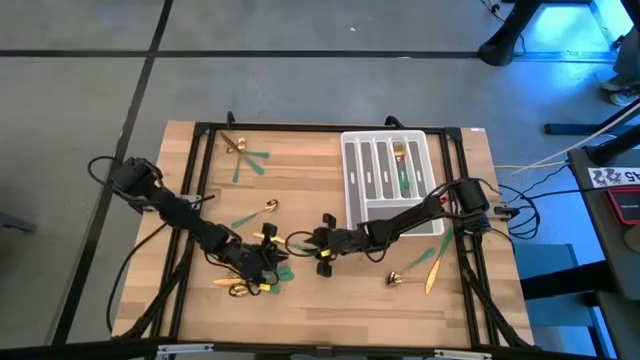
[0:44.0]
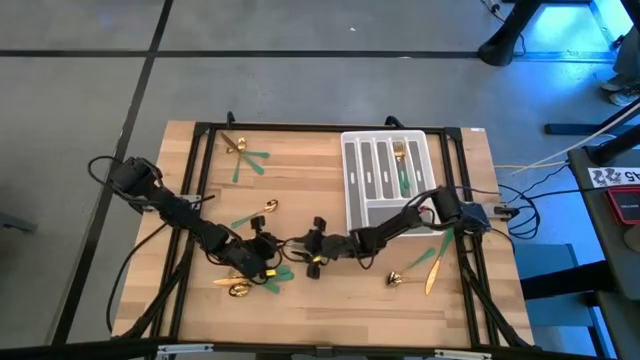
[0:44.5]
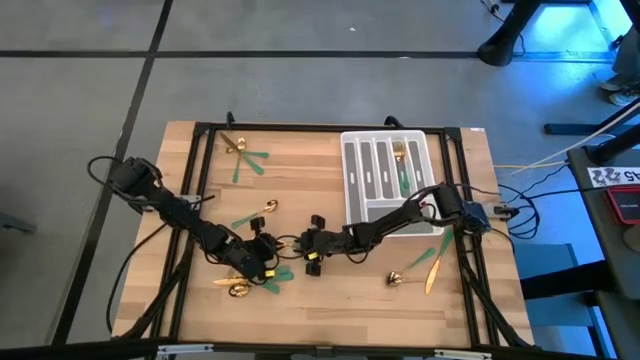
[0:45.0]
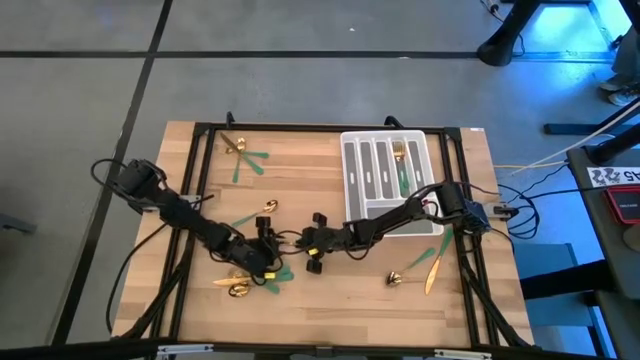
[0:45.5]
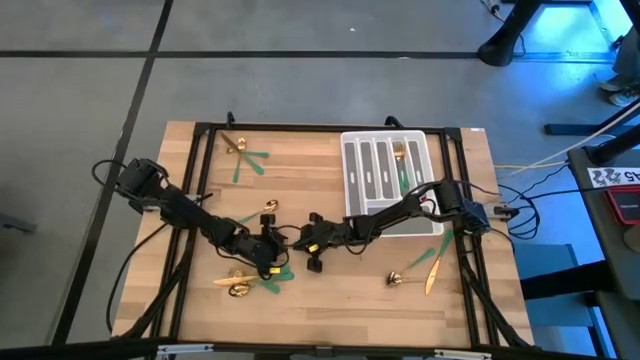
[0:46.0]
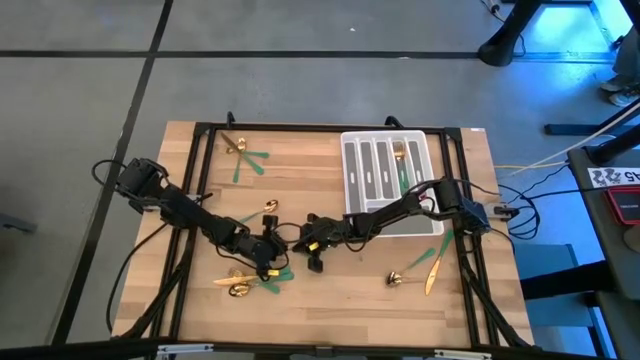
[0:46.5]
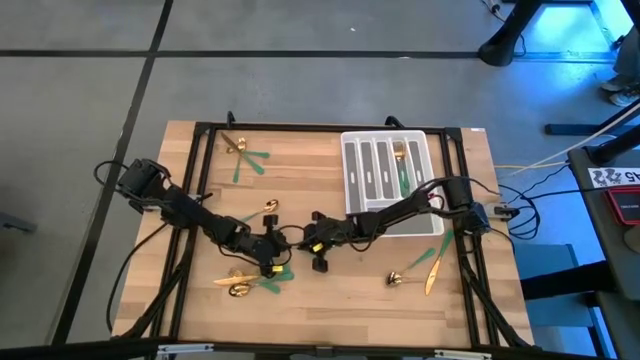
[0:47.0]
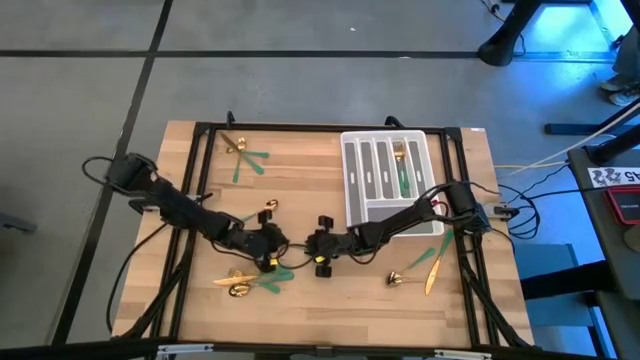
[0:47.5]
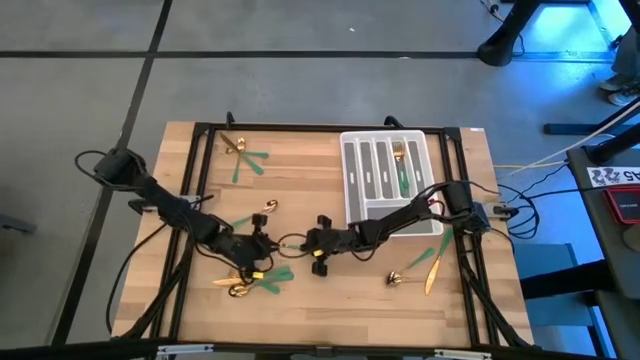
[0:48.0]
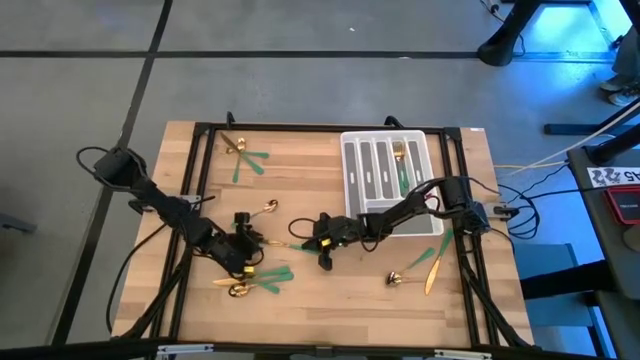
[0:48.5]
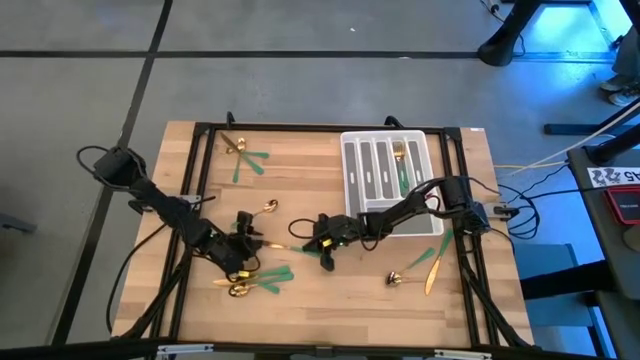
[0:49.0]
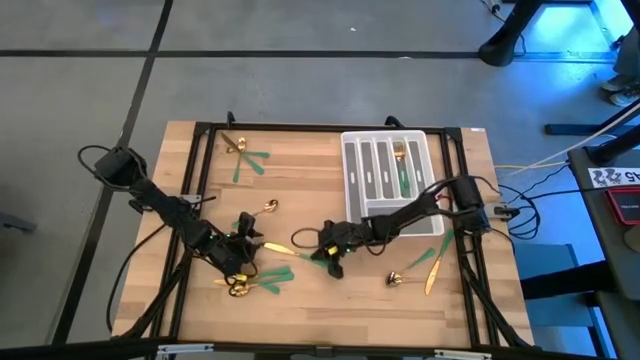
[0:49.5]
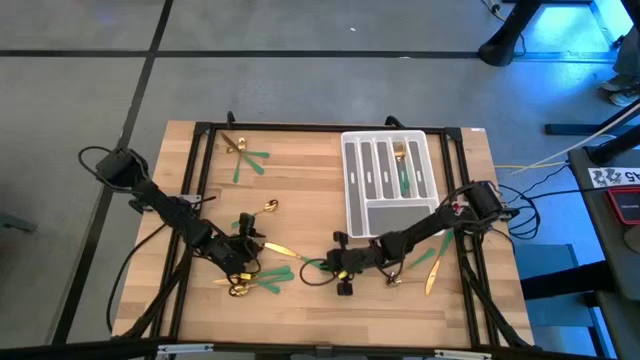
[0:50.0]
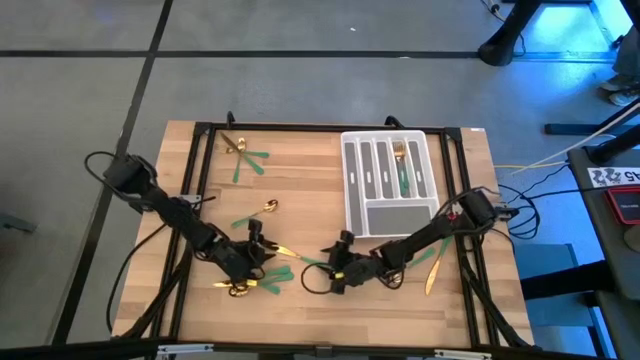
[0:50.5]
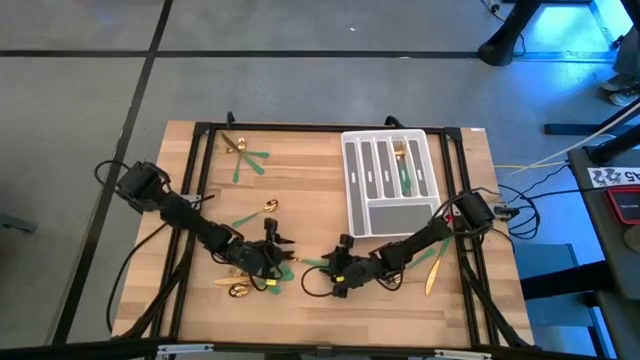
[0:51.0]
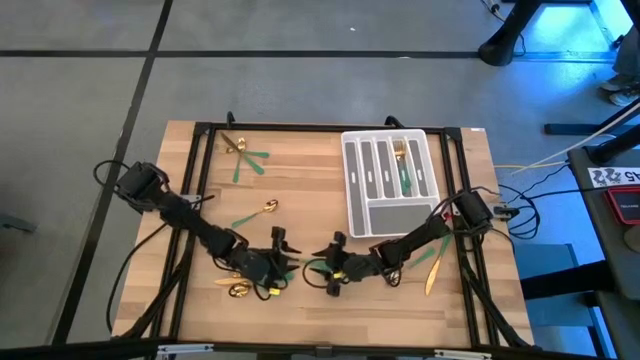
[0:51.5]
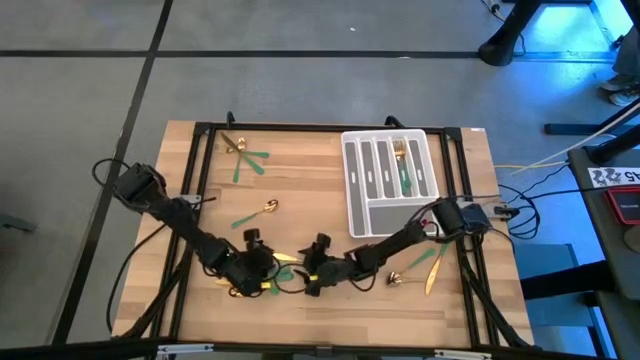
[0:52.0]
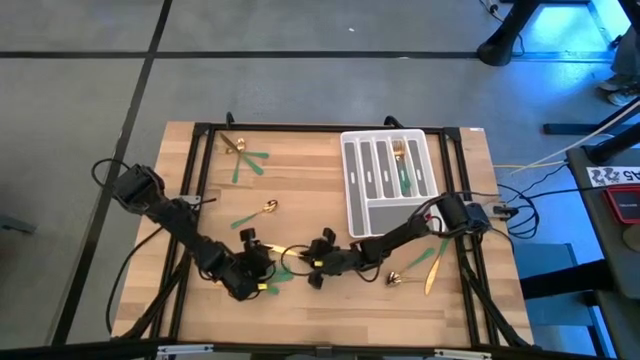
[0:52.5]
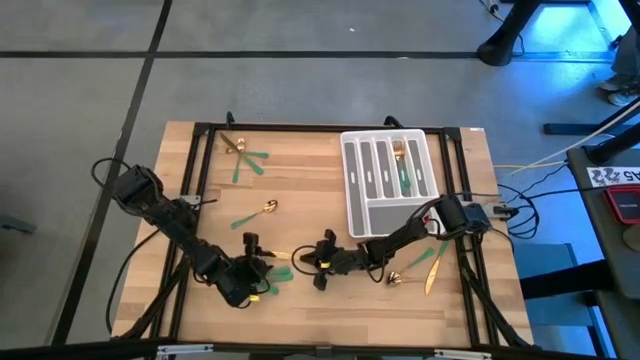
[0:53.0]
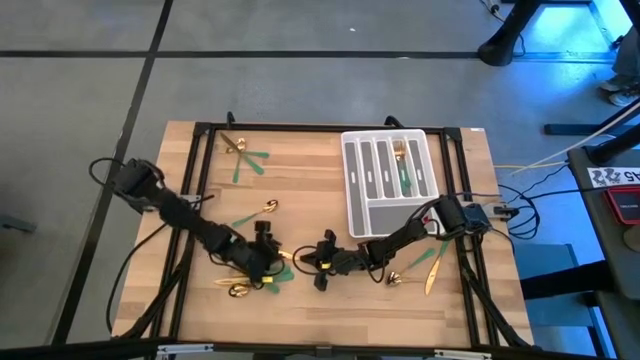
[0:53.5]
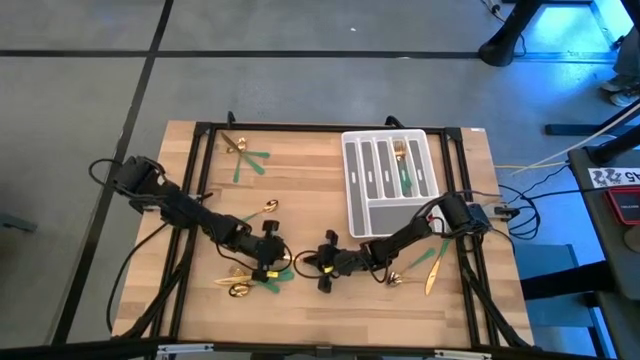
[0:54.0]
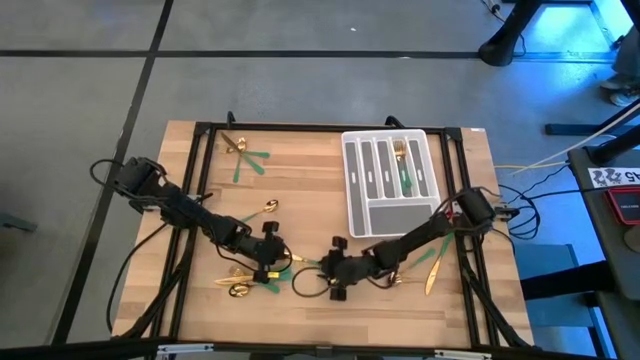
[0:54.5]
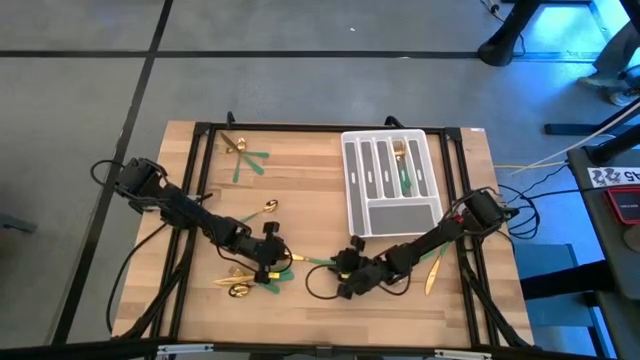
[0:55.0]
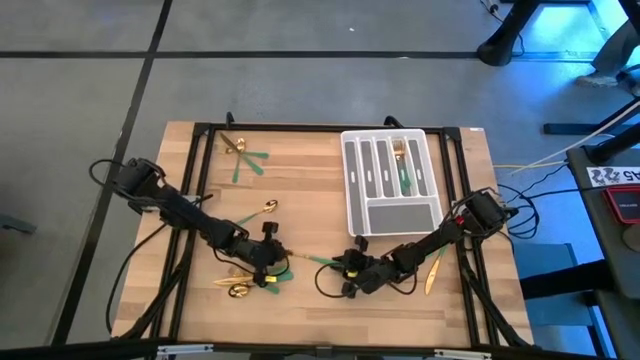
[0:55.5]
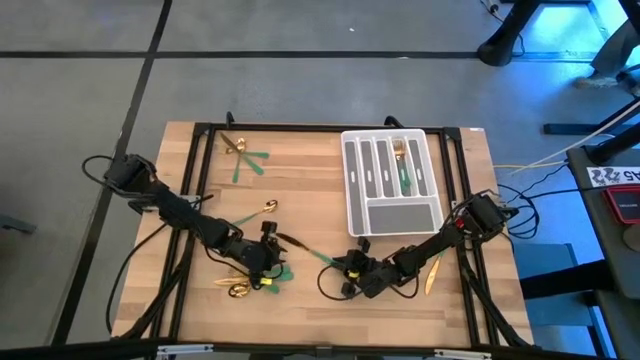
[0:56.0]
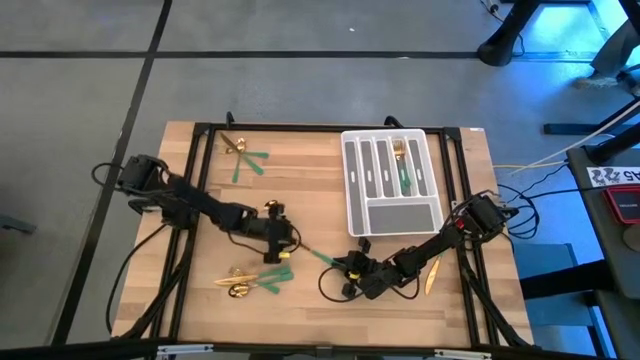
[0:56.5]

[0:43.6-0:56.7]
Task: Sort silverware
Put the green knife into the silverware tray

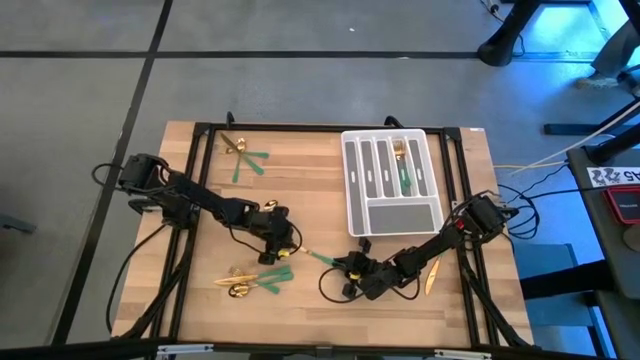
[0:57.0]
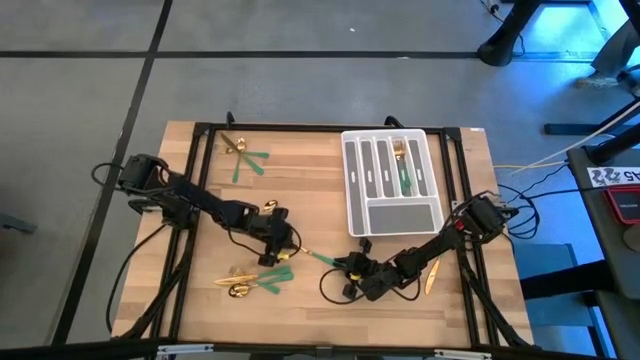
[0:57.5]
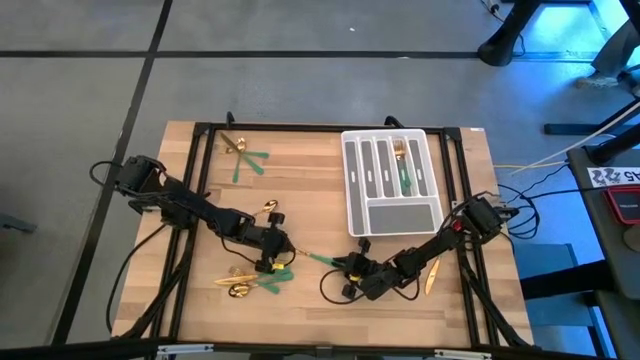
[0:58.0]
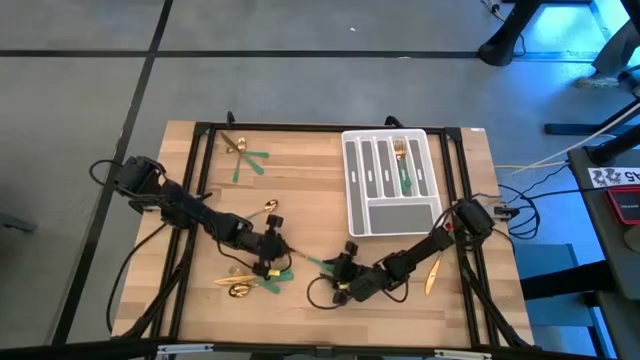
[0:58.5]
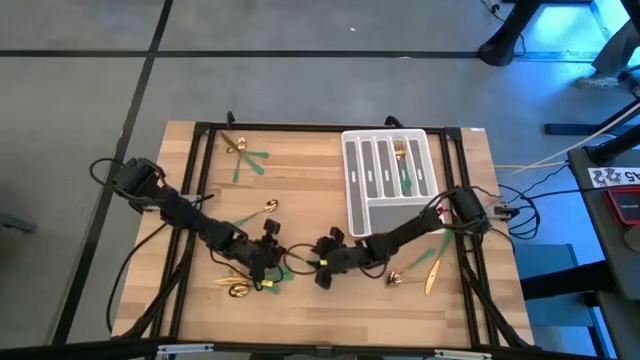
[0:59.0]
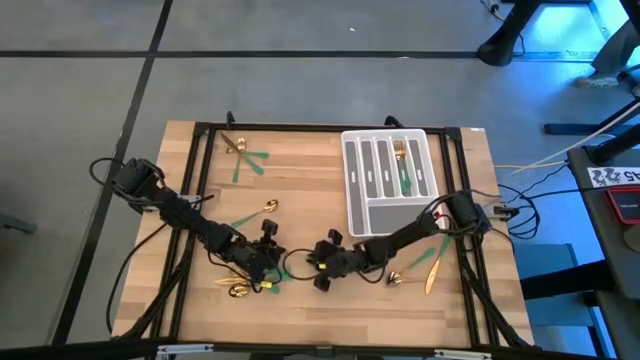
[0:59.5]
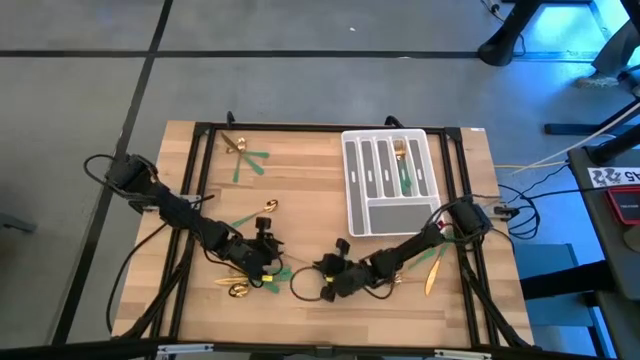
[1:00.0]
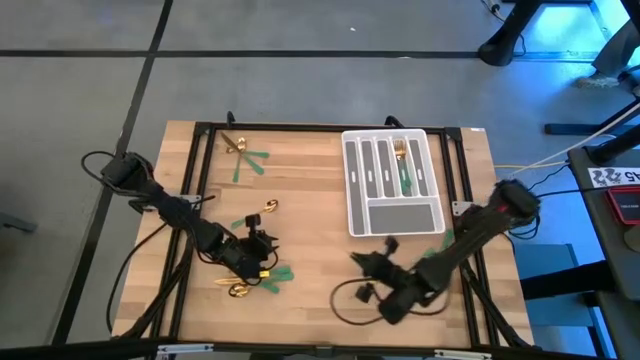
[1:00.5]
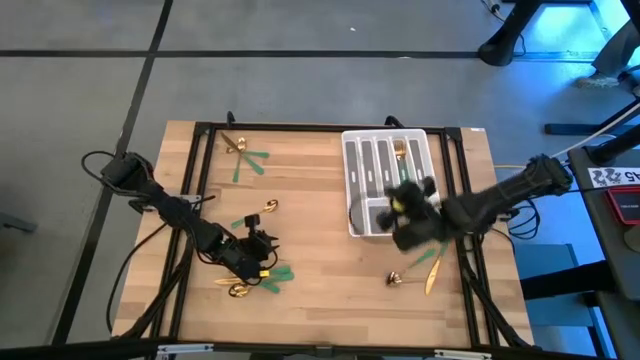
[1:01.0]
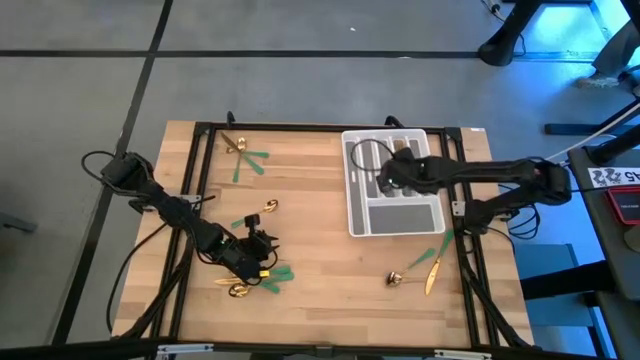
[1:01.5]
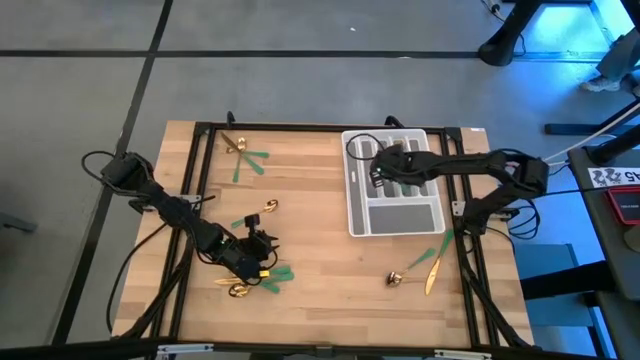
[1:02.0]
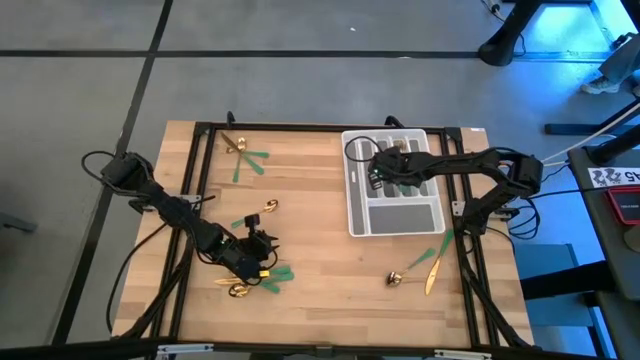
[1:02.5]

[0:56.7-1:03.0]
Put the green knife into the silverware tray

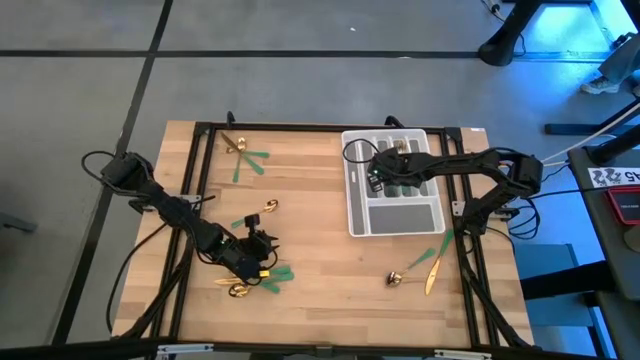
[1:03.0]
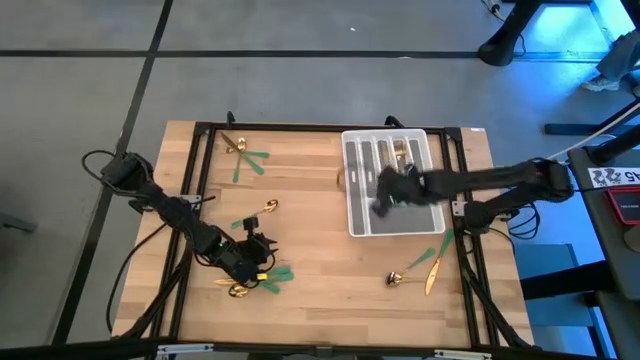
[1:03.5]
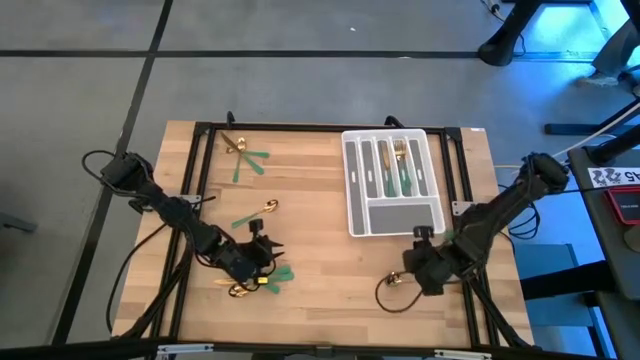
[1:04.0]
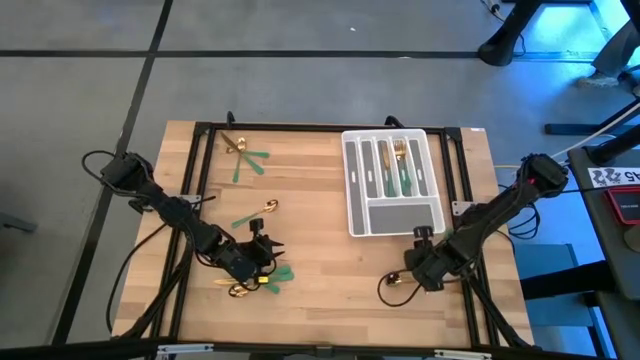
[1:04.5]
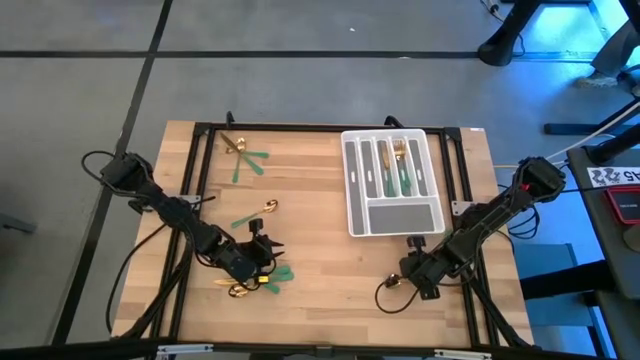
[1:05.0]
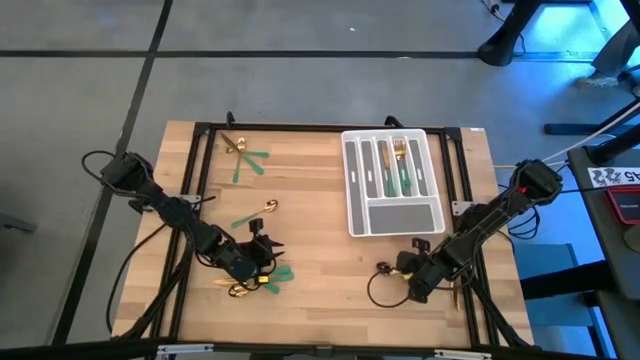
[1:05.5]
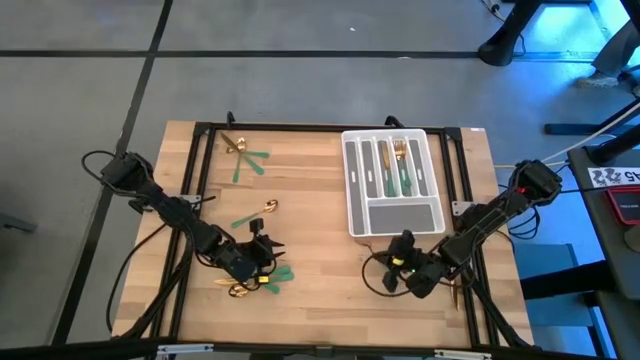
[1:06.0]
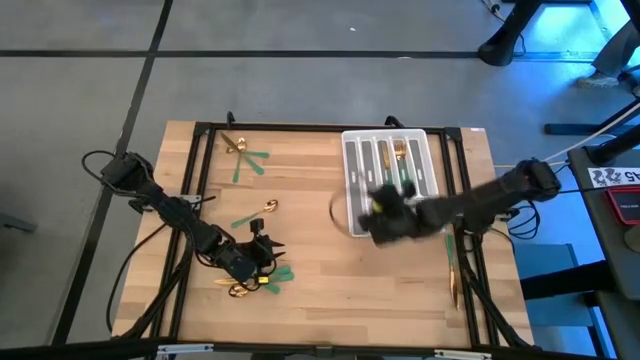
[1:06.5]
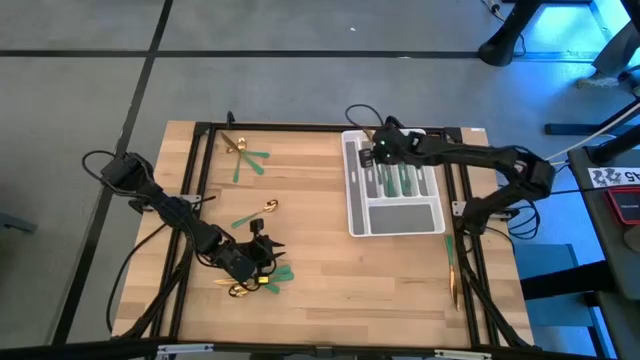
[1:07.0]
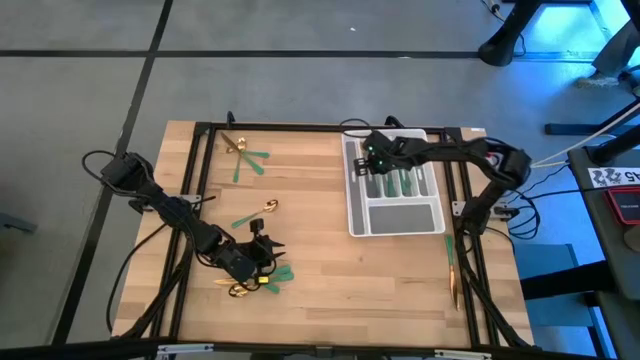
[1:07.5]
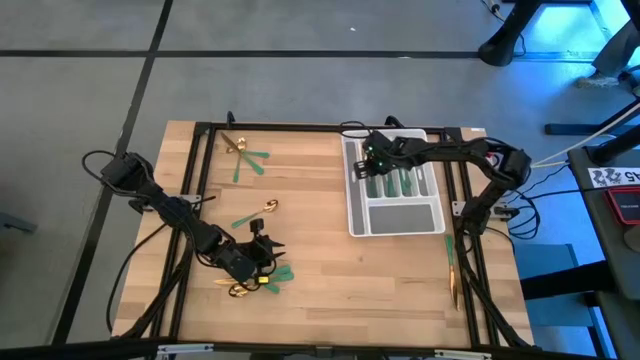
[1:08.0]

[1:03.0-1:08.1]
Put the green spoon into the silverware tray
